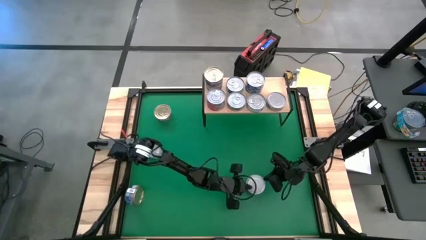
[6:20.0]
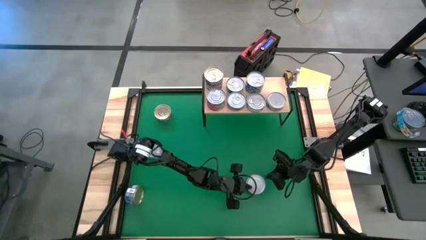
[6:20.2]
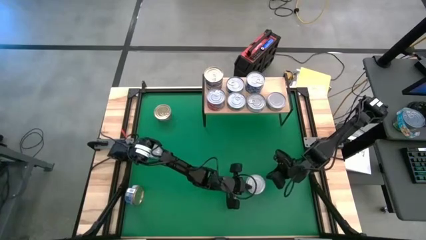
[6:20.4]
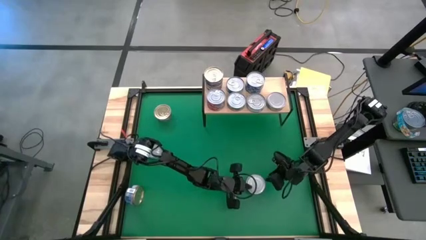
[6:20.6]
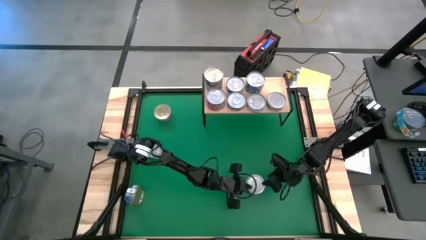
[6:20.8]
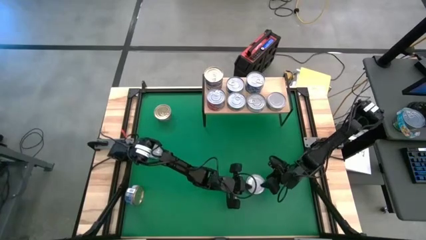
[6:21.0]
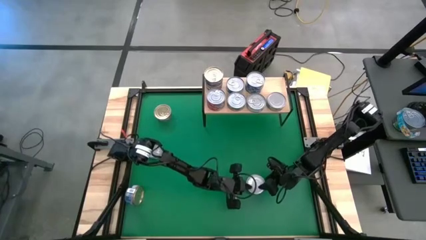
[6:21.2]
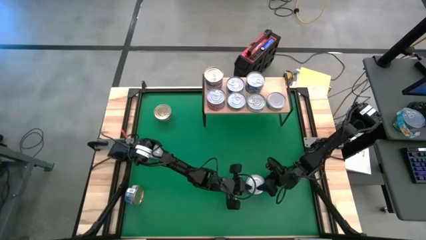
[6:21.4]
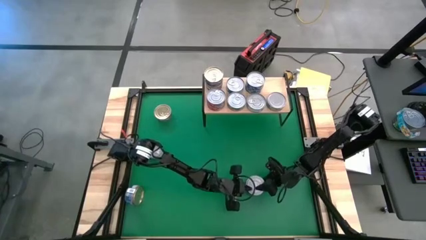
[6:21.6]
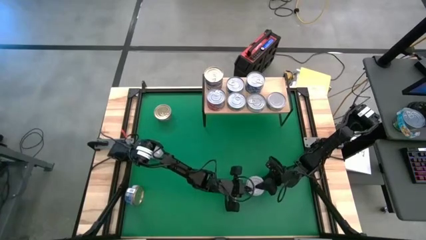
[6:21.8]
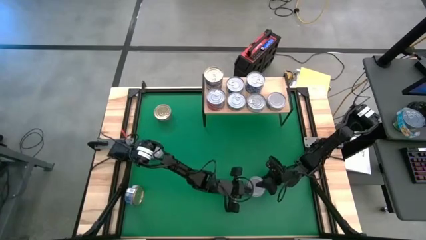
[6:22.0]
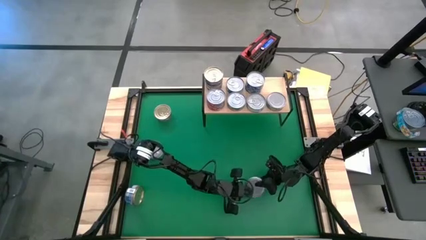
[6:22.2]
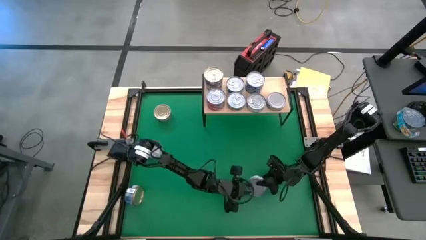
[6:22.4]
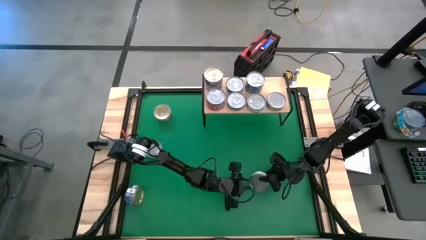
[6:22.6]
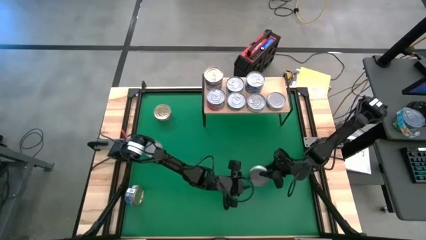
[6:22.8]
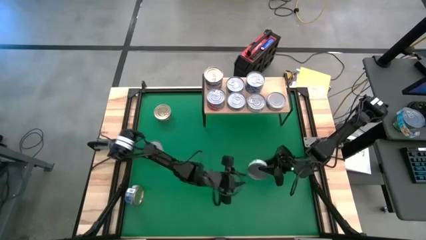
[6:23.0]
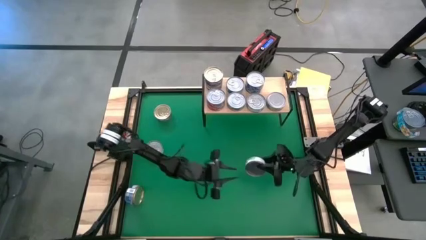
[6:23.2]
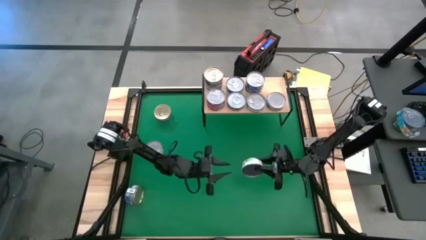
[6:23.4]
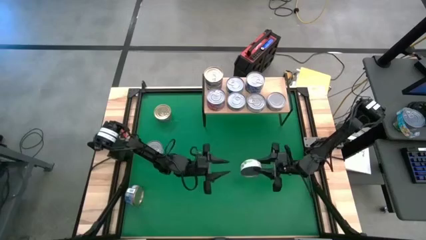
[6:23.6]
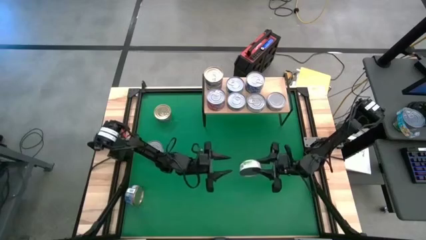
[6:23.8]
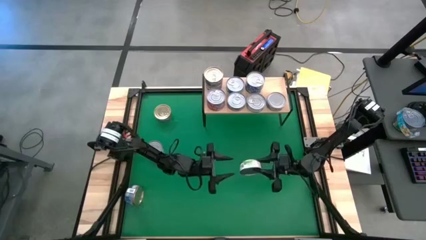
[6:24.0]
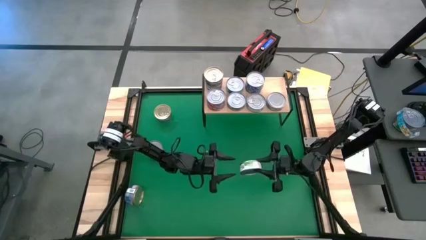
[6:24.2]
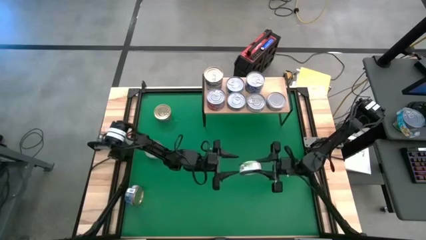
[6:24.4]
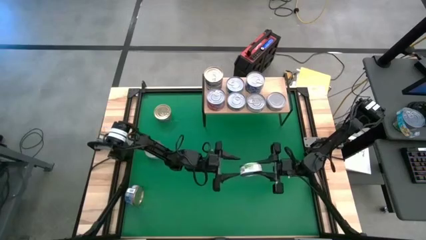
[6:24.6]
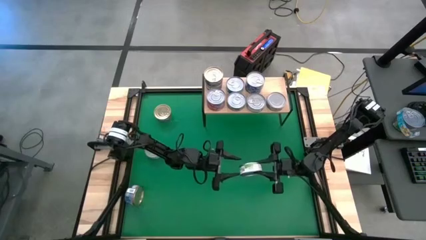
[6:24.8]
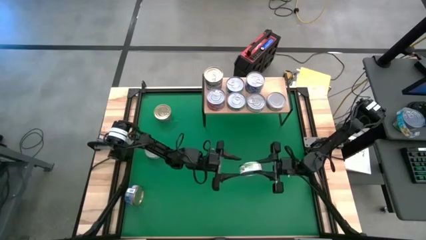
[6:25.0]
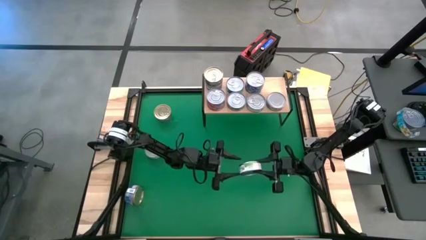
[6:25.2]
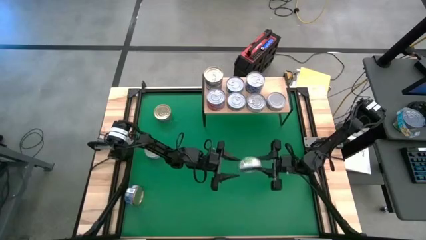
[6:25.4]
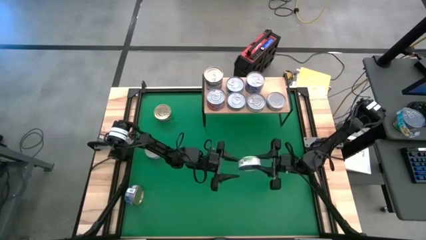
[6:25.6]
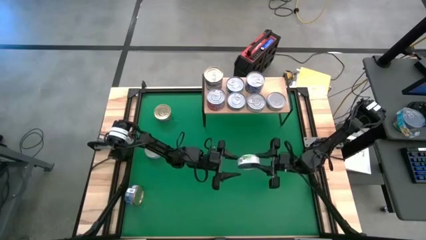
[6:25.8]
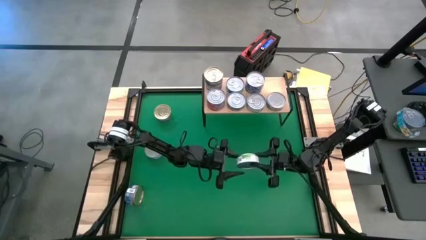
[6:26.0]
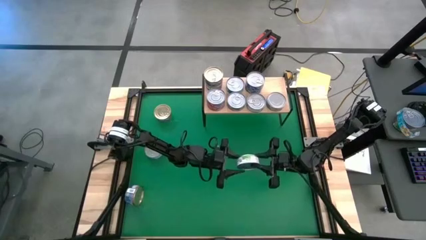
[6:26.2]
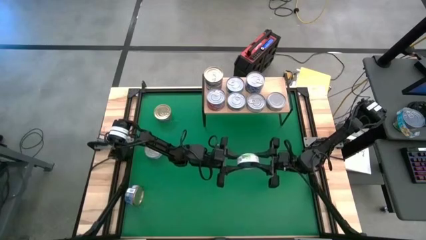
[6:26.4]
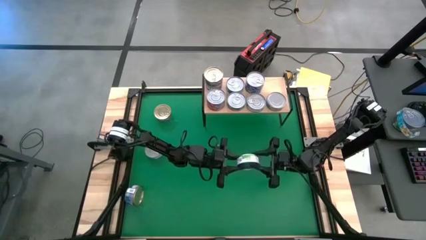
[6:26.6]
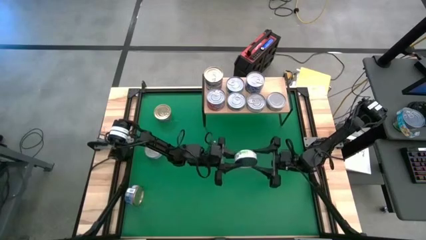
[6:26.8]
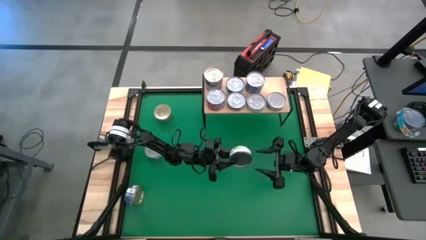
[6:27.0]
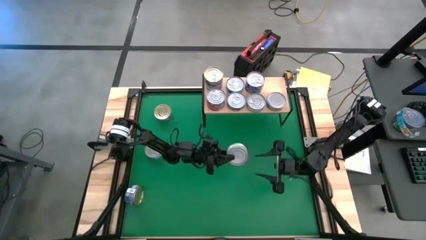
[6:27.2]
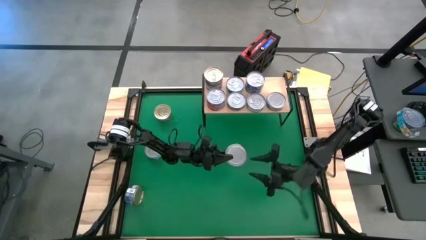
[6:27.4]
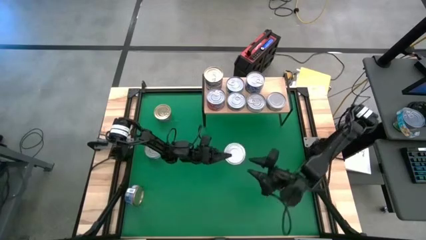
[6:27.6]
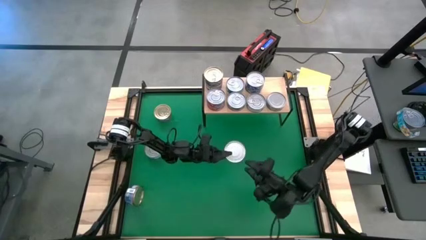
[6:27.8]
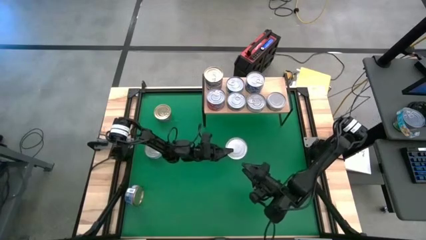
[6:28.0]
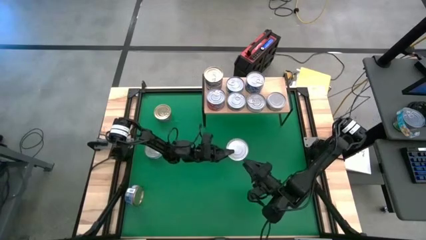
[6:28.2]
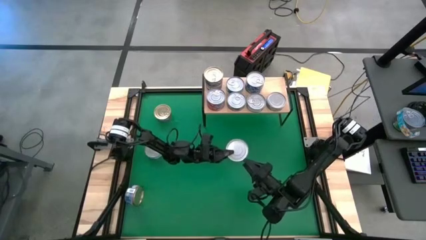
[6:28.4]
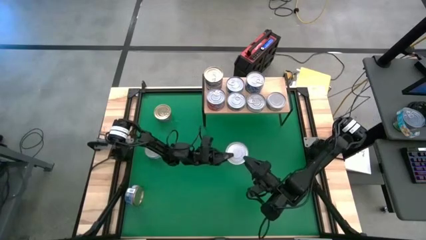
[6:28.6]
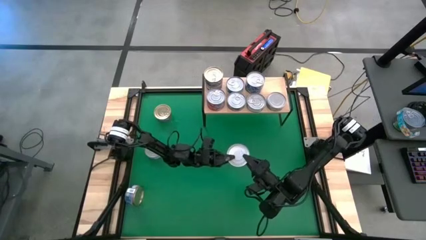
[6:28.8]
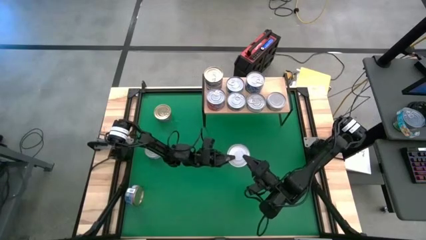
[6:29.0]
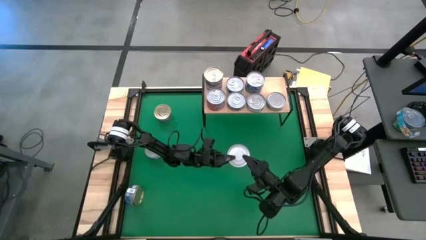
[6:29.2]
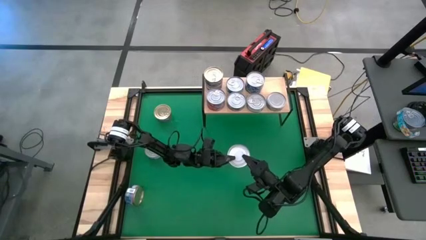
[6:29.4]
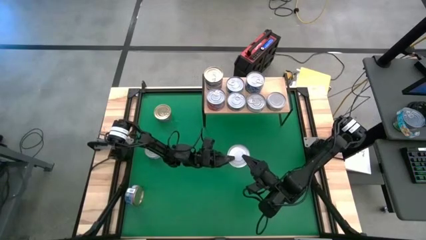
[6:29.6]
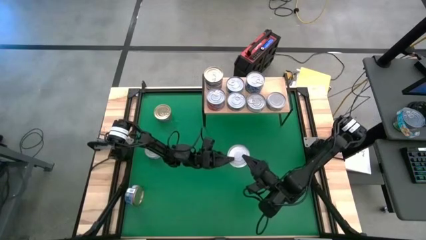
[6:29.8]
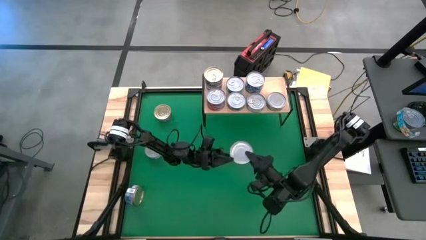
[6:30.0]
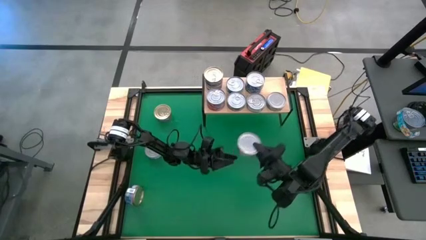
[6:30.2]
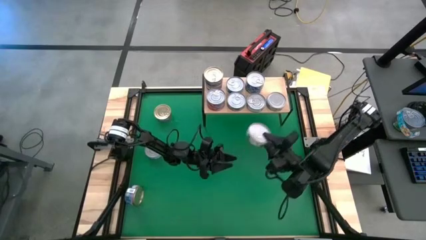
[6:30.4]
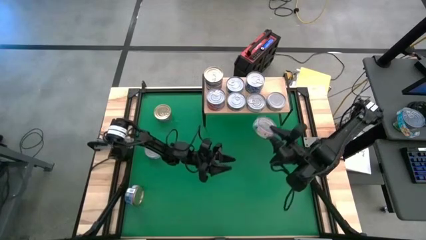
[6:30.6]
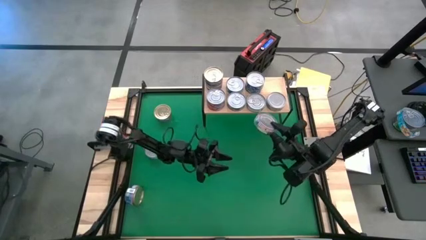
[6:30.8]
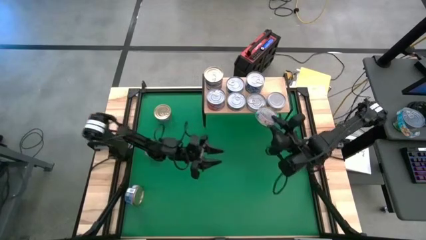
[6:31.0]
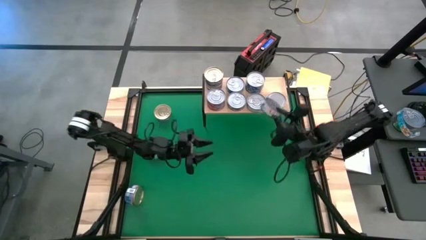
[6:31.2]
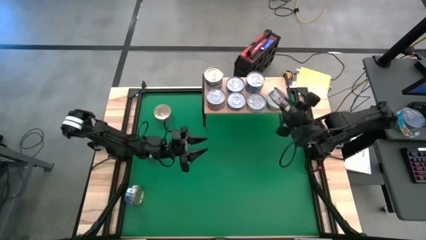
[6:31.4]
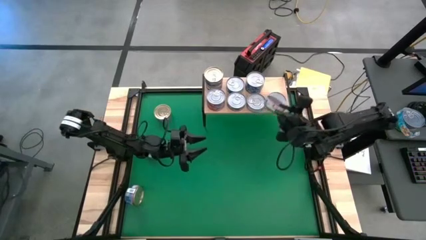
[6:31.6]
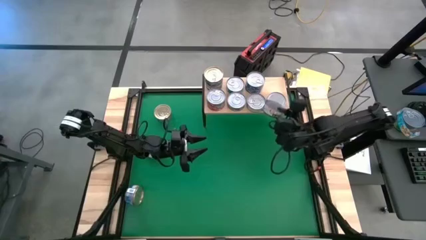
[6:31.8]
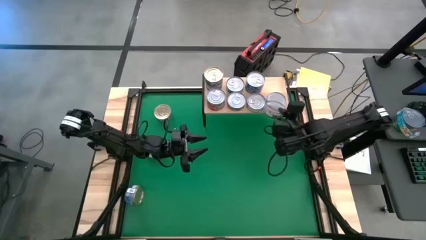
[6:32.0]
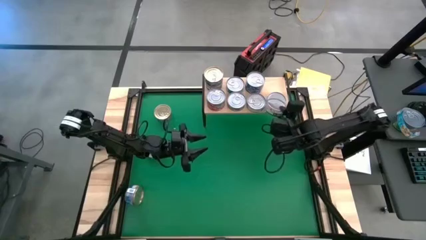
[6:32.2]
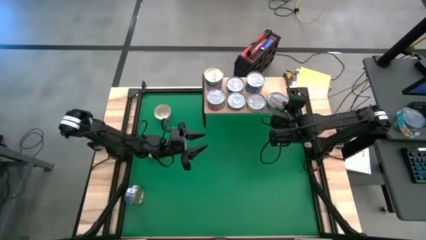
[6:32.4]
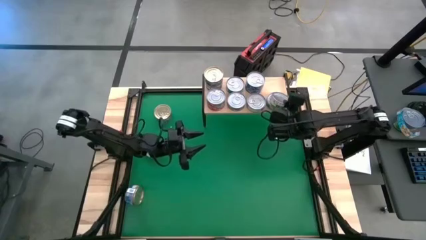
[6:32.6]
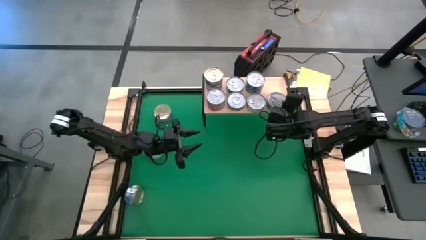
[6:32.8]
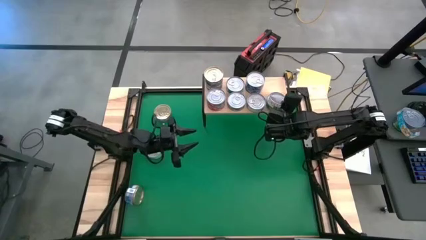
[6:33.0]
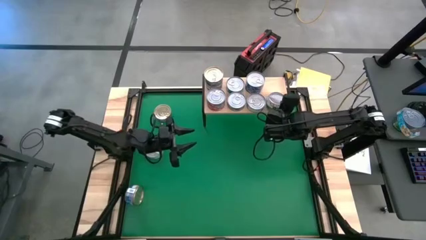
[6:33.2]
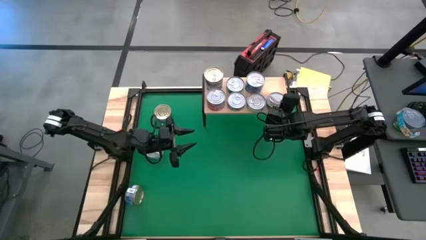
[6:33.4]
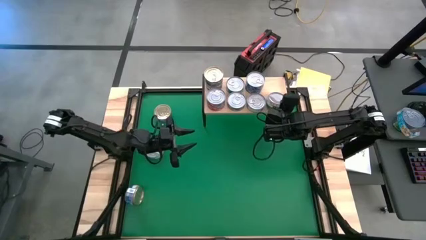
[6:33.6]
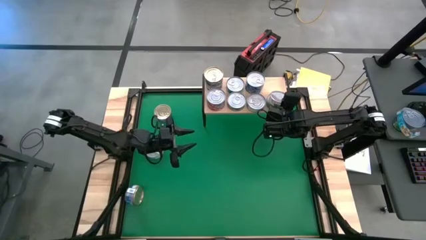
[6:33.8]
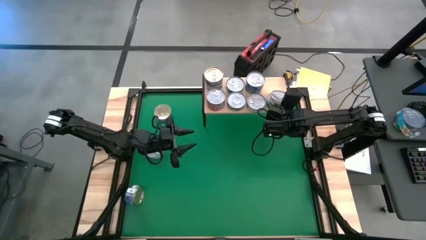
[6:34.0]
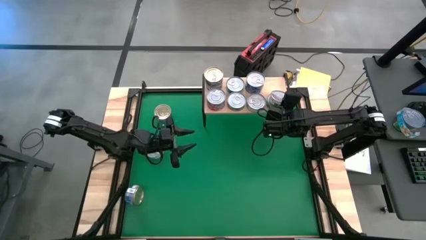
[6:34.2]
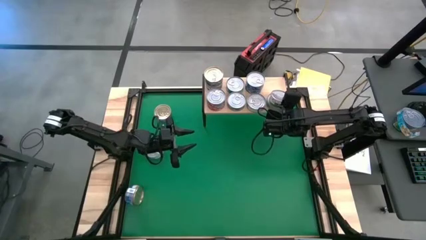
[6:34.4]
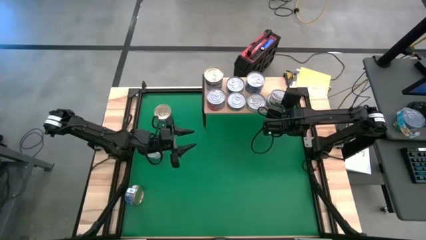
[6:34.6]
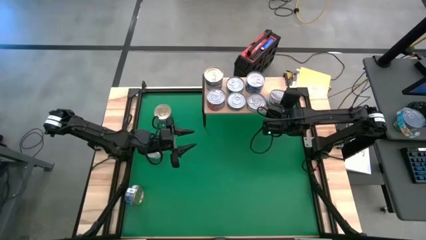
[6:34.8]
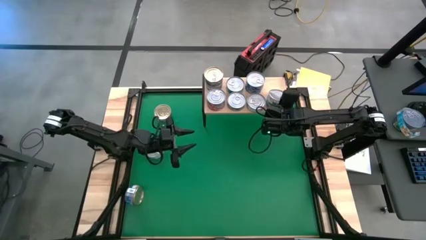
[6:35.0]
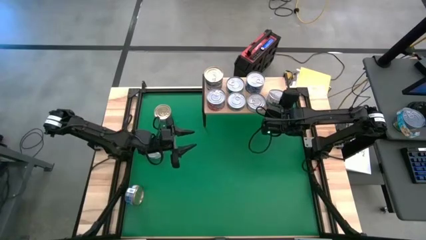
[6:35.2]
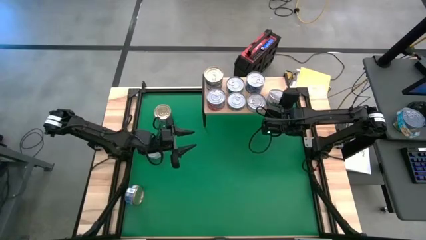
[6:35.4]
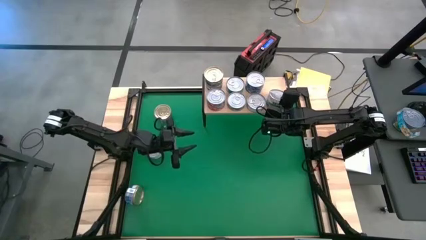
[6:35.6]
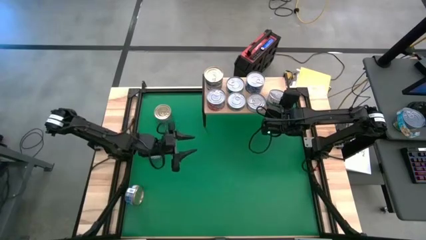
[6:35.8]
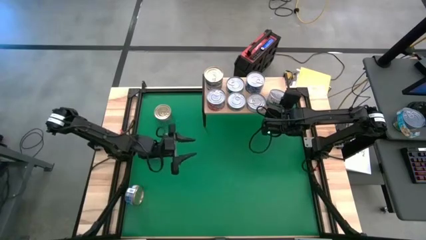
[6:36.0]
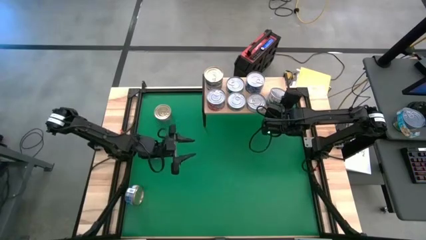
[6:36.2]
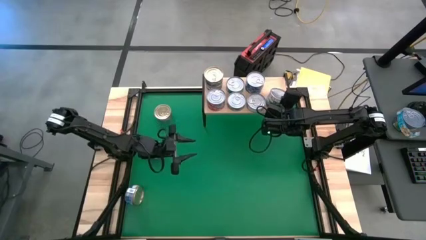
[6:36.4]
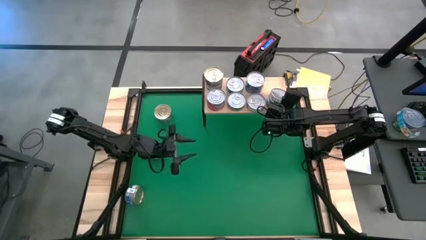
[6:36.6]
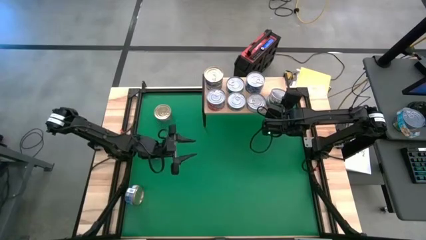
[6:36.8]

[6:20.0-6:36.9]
Task: Stack canned seafood by type on shelf
Stack the green tuna can on top of the other green tuna can on the shelf
